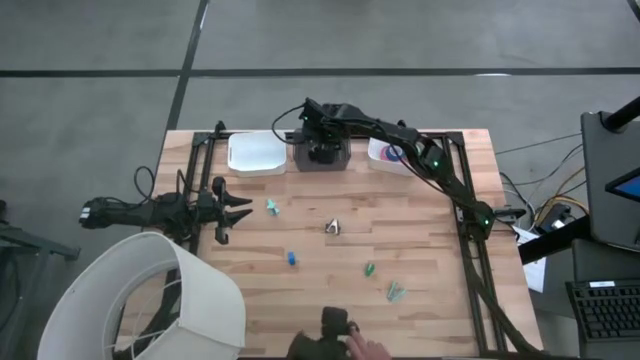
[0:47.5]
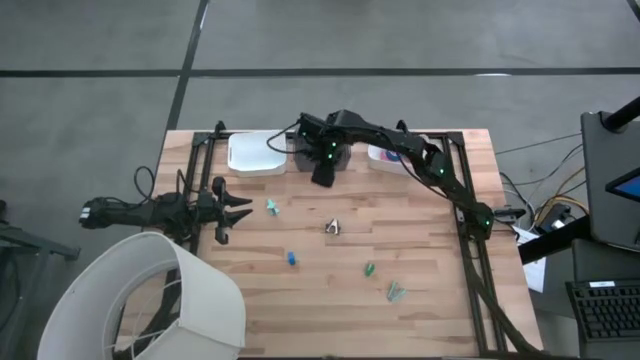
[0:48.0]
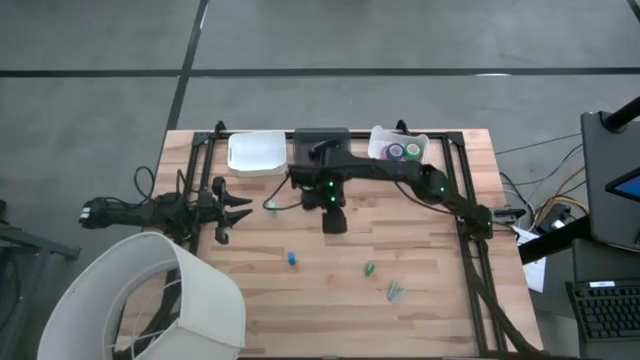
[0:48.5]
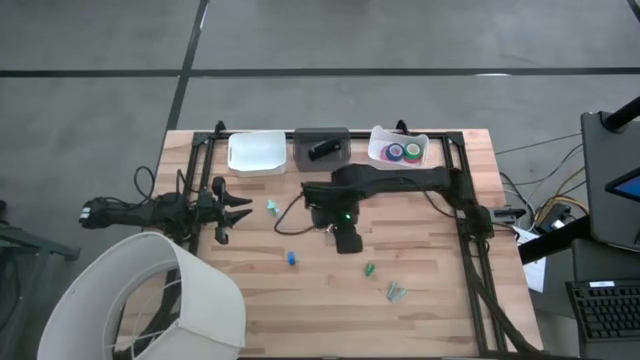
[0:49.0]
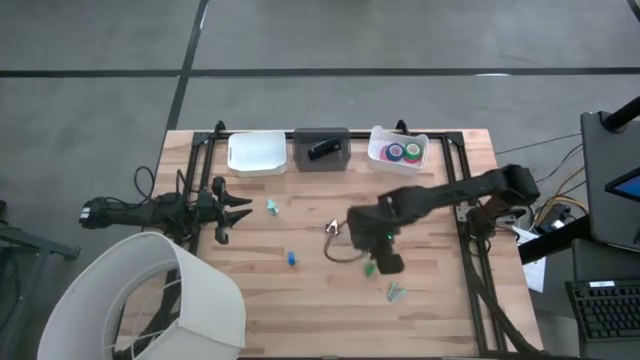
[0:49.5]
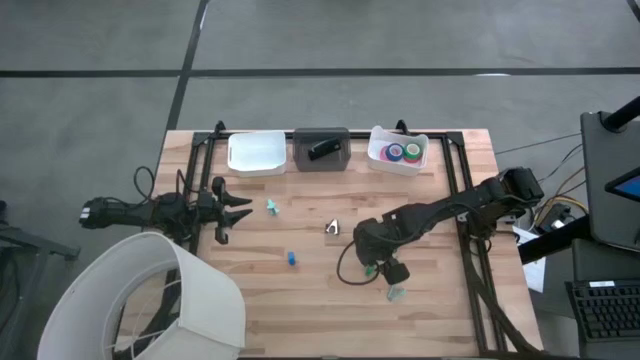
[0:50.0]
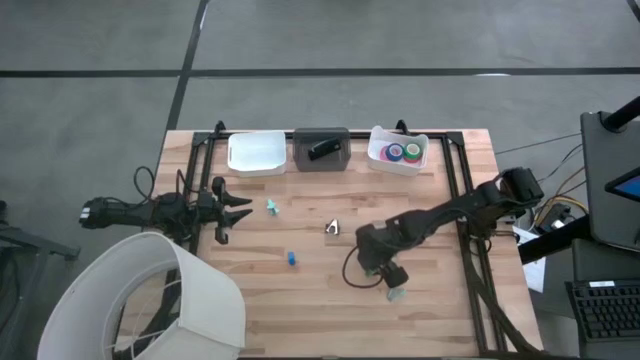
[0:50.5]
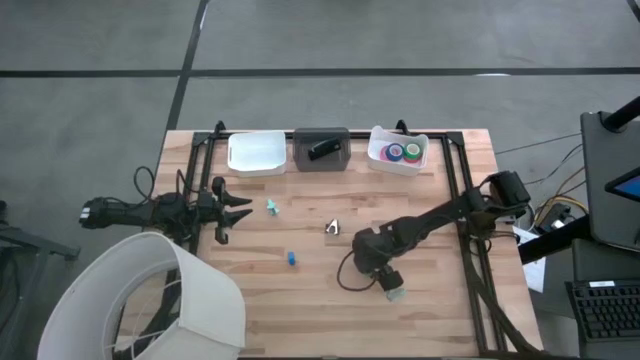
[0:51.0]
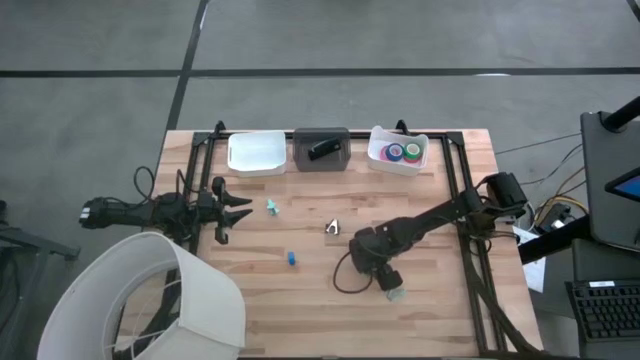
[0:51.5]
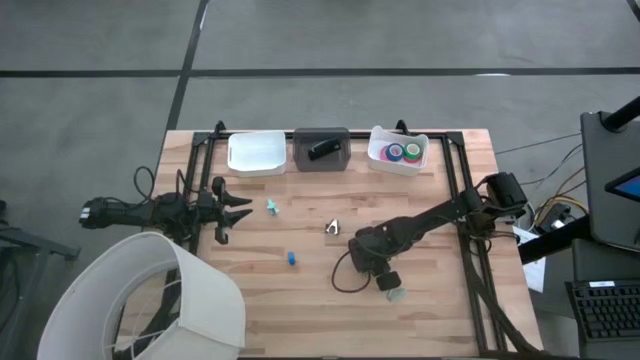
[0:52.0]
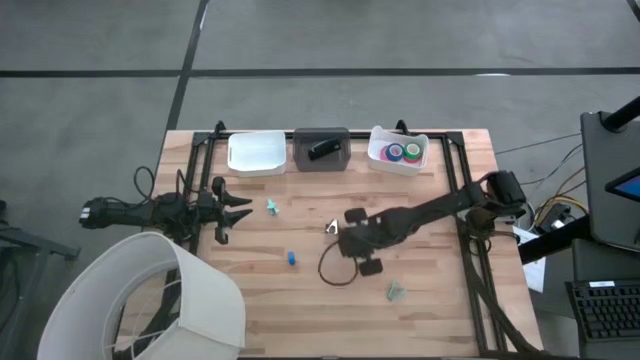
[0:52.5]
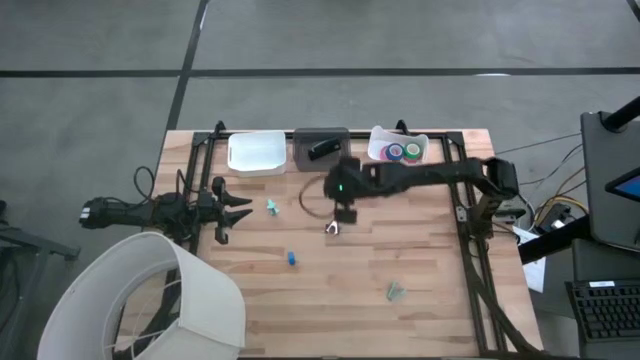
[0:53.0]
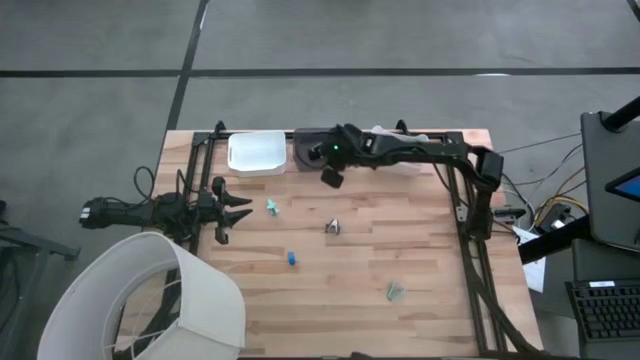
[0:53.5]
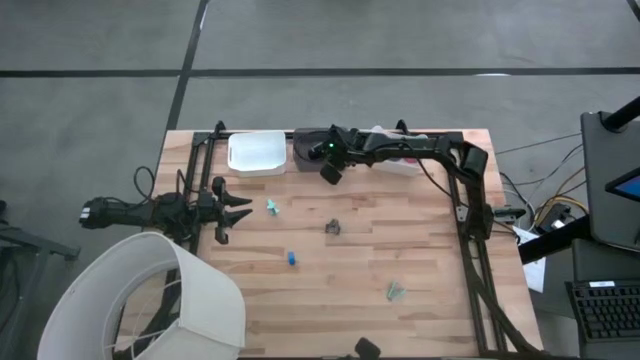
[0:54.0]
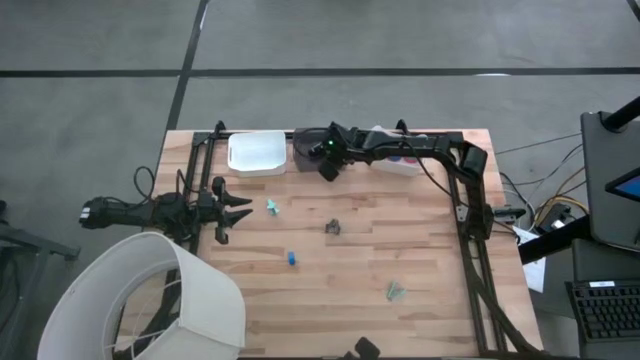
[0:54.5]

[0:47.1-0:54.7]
Task: Pick and place Stapler, Stapler remover, tape
Put the green stapler into the black bin

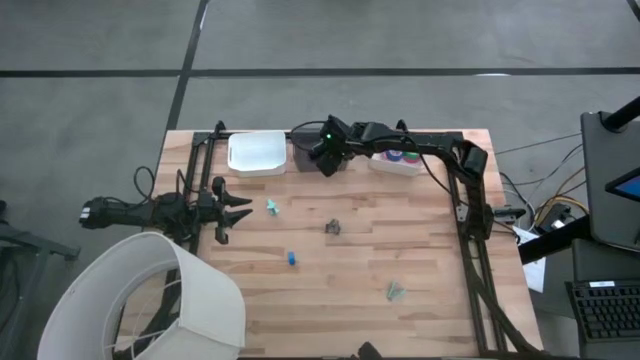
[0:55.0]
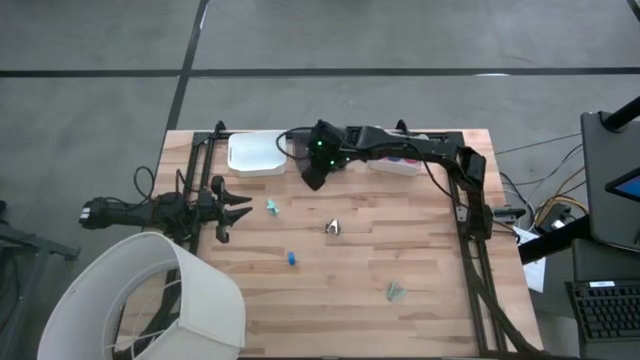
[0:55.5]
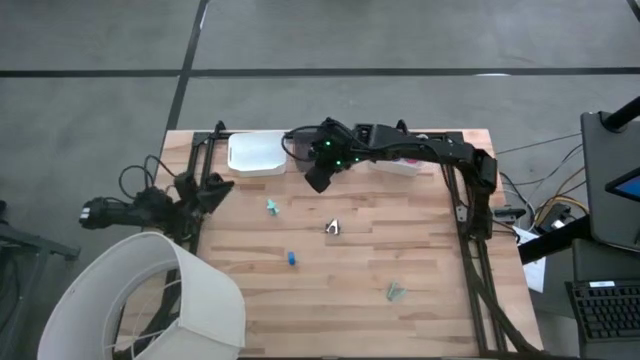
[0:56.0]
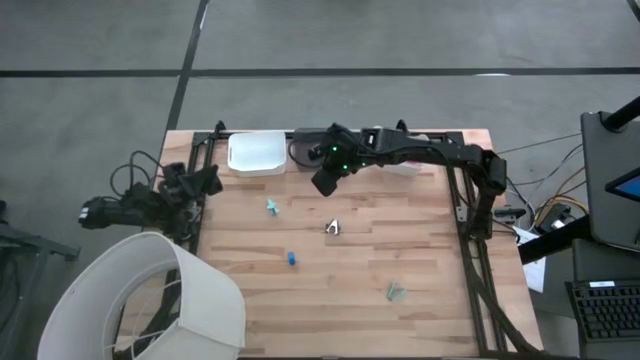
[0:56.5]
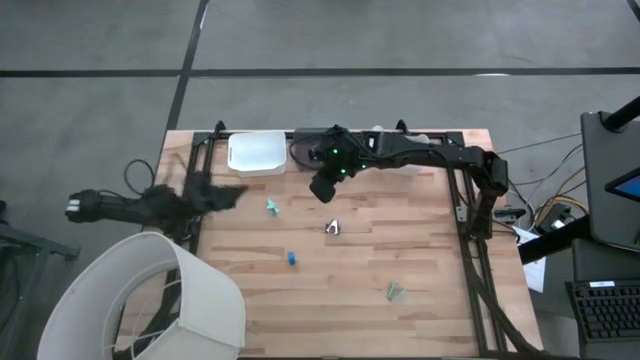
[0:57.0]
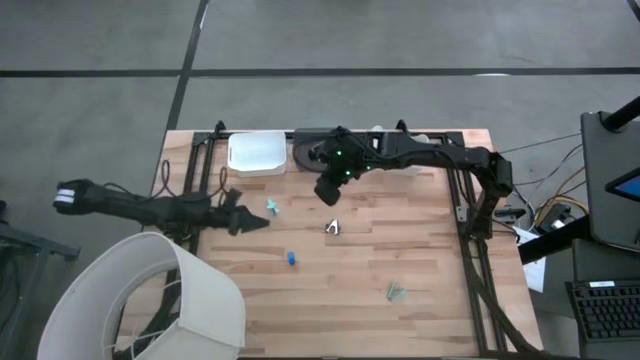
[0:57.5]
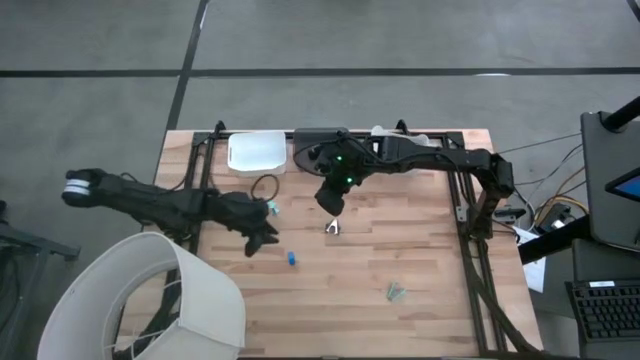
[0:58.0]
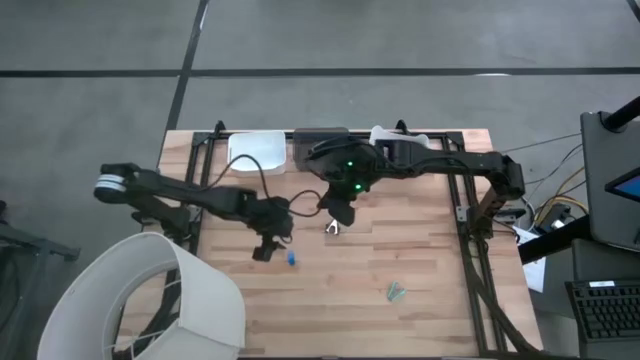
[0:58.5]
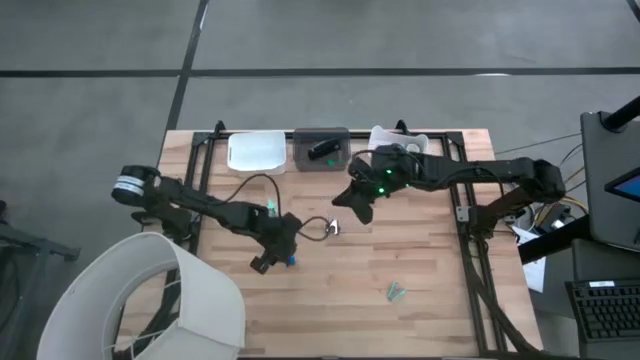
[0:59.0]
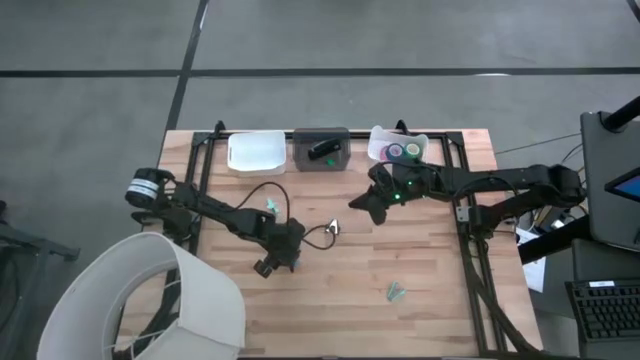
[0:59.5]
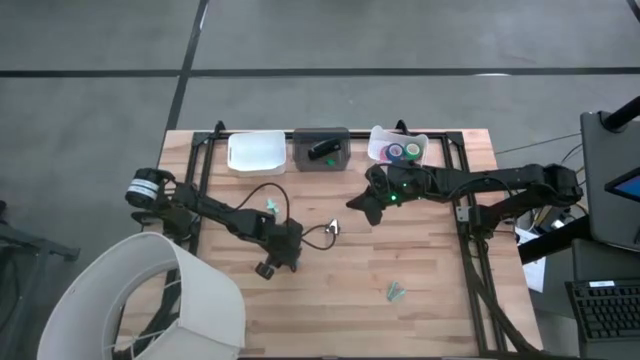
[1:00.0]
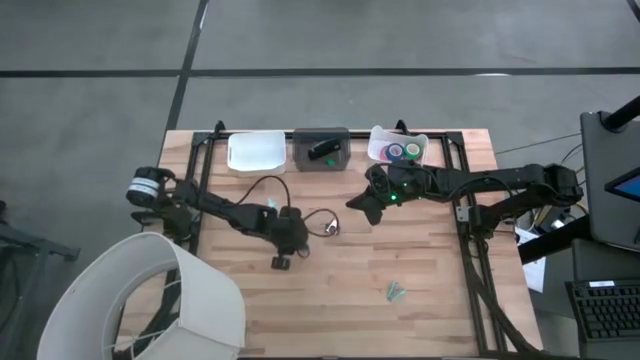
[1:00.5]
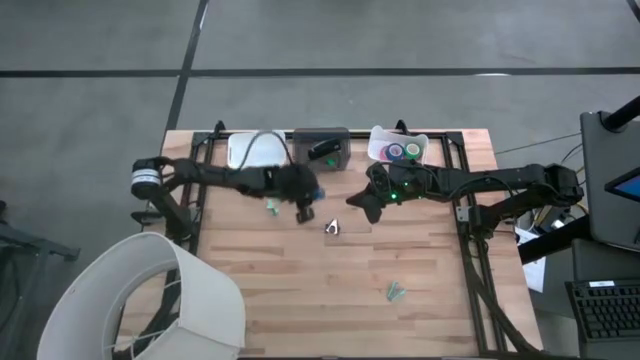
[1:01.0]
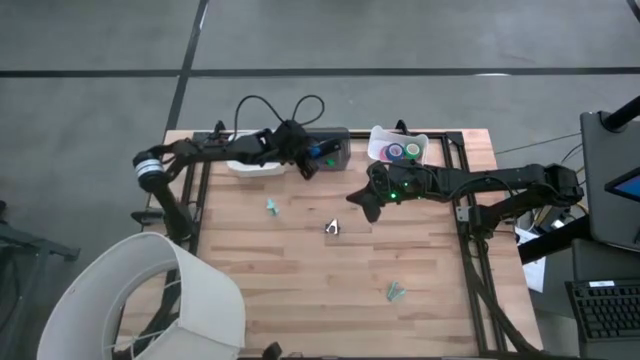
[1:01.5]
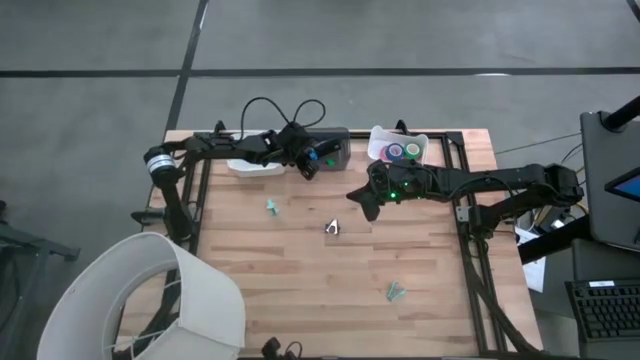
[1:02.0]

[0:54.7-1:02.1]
Put the blue stapler into the black bin

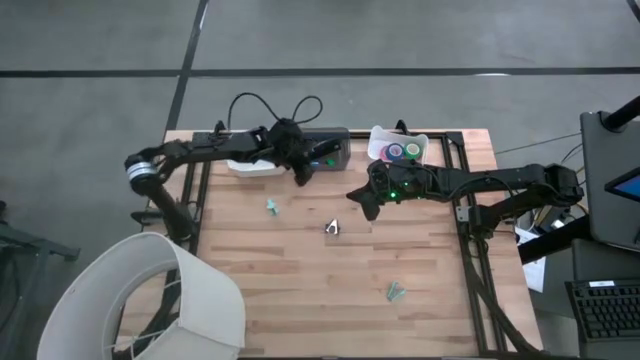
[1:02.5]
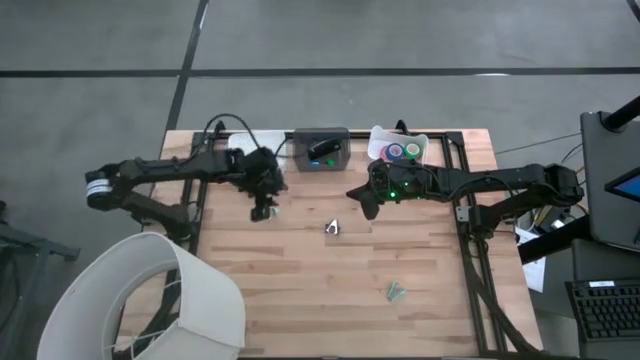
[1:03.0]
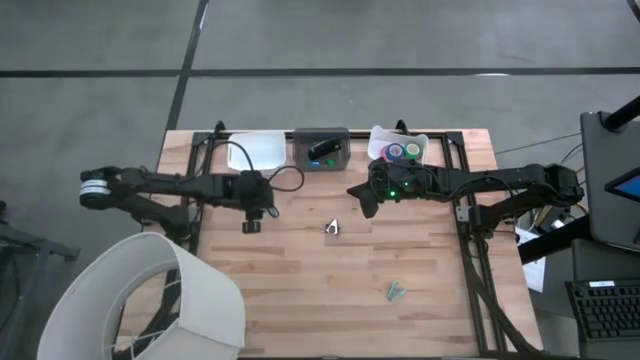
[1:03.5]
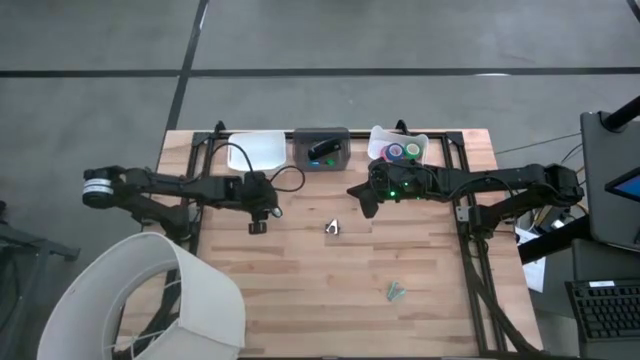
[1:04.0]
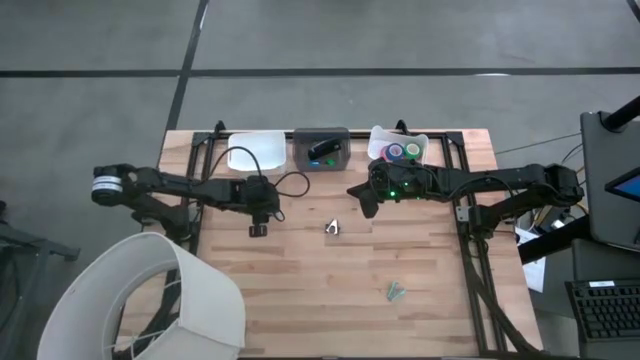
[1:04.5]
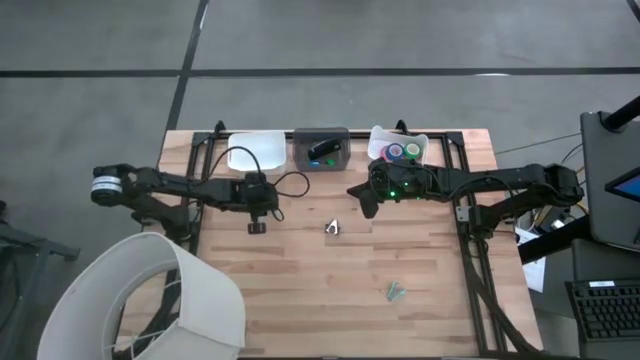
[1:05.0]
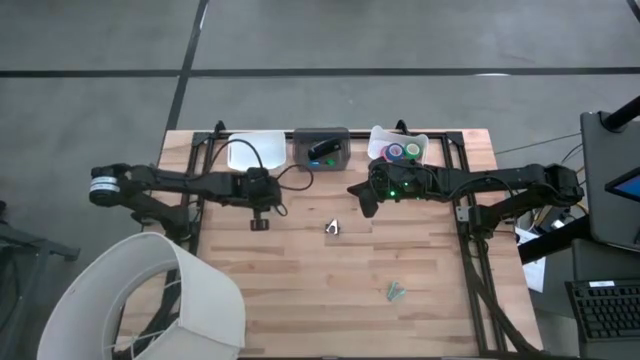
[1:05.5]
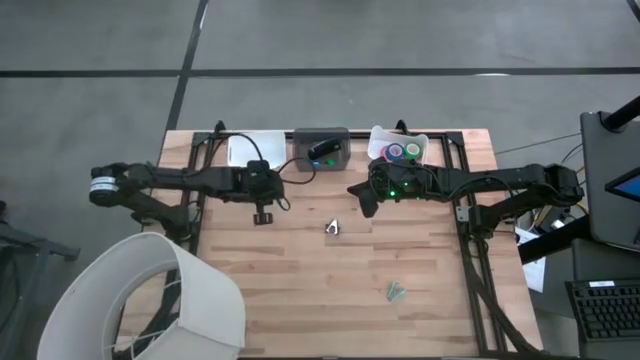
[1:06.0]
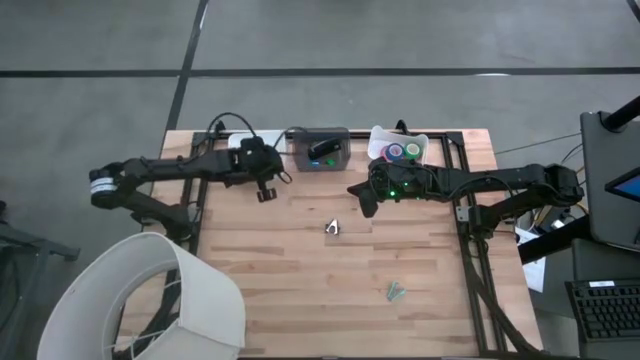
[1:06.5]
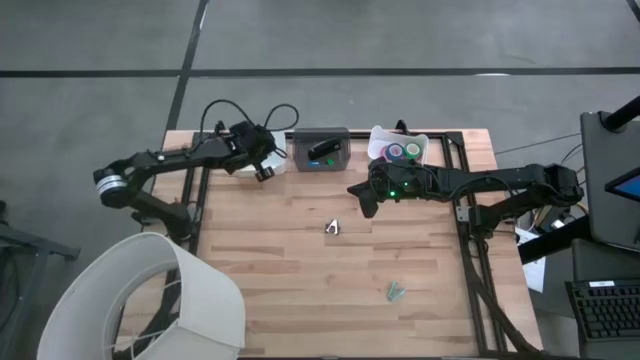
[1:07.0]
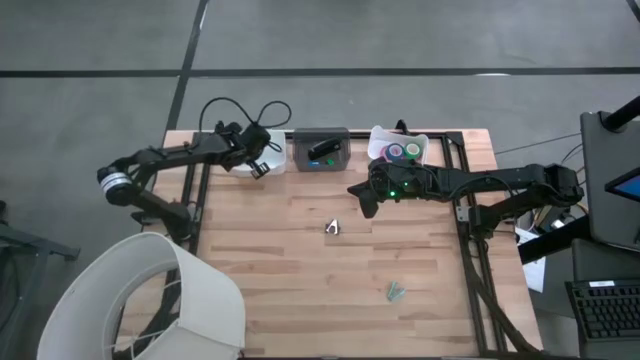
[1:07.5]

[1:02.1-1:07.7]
Put the top light blue staple remover into the left white bin
